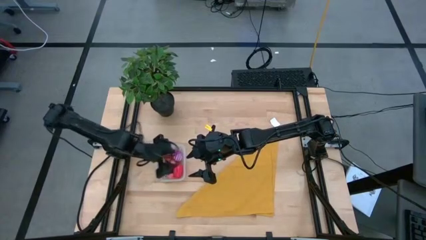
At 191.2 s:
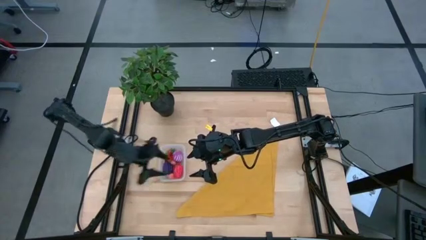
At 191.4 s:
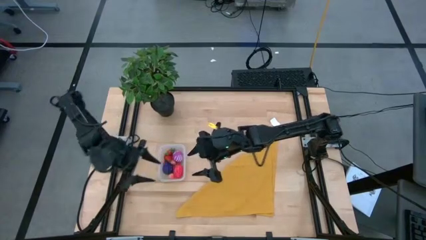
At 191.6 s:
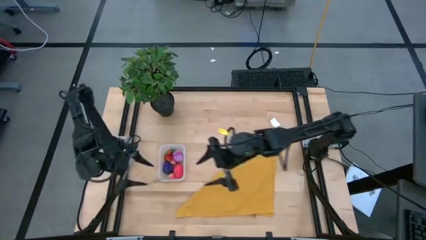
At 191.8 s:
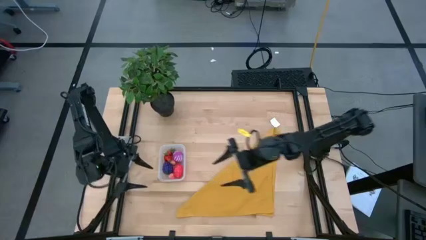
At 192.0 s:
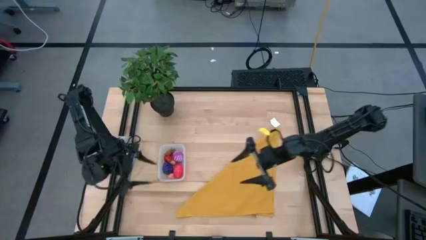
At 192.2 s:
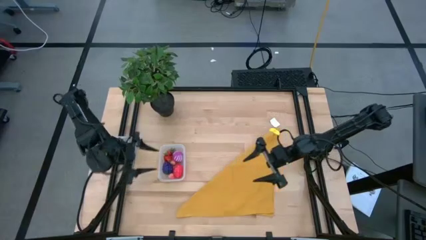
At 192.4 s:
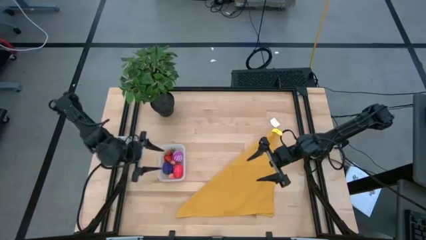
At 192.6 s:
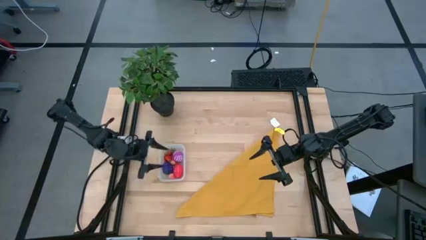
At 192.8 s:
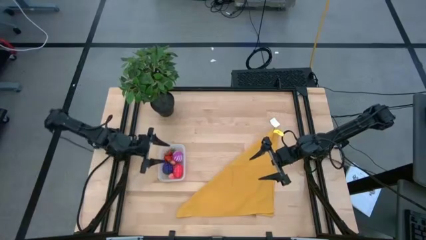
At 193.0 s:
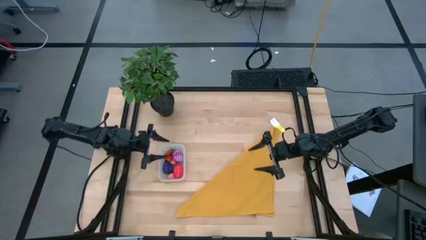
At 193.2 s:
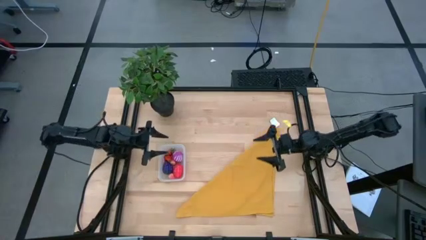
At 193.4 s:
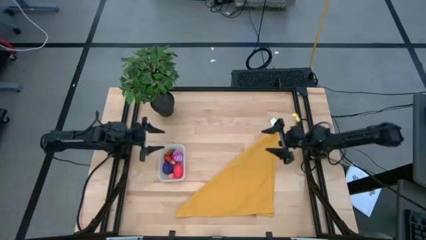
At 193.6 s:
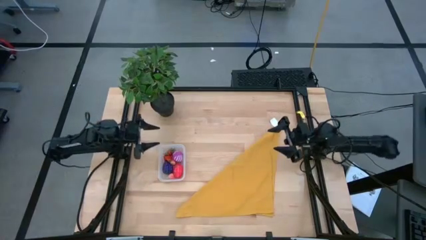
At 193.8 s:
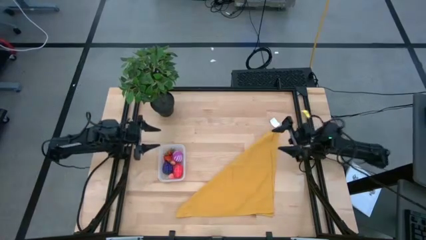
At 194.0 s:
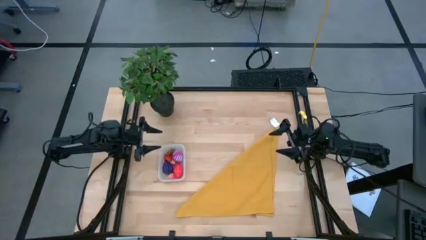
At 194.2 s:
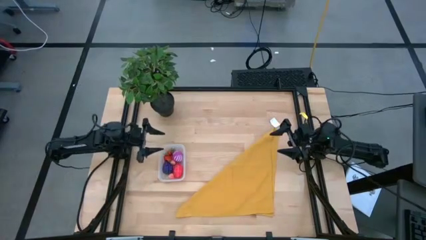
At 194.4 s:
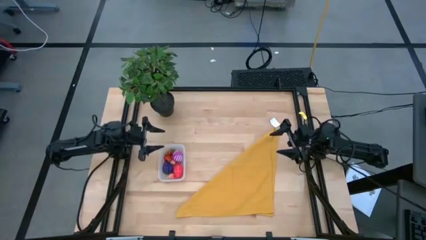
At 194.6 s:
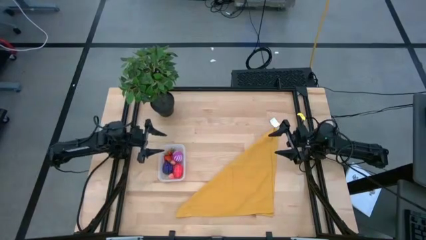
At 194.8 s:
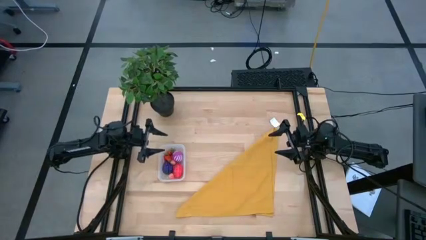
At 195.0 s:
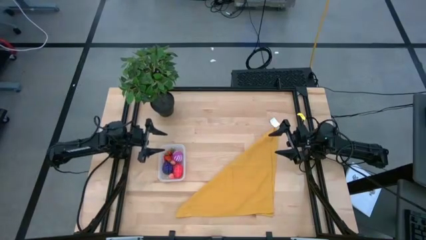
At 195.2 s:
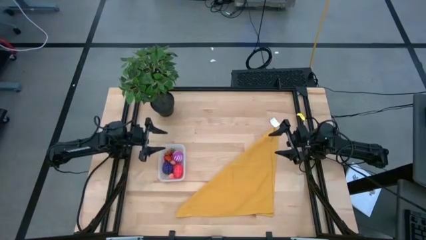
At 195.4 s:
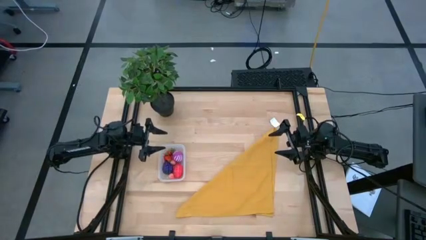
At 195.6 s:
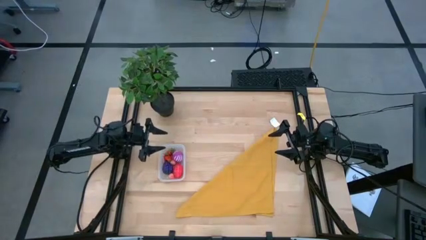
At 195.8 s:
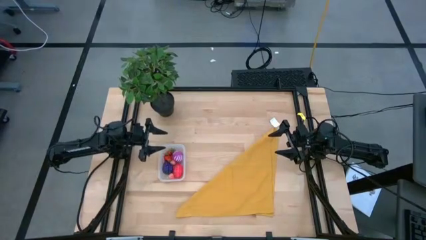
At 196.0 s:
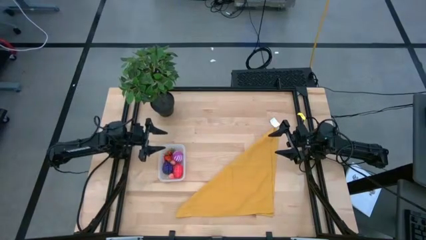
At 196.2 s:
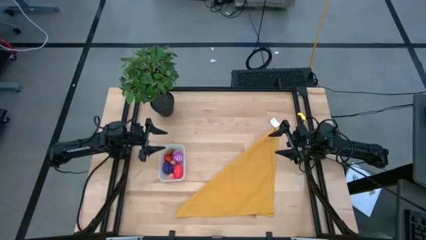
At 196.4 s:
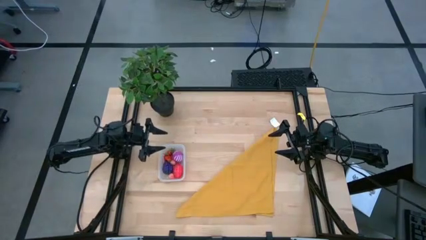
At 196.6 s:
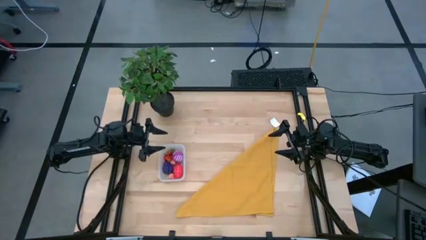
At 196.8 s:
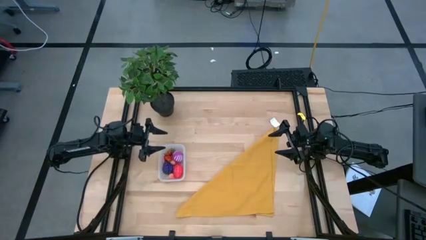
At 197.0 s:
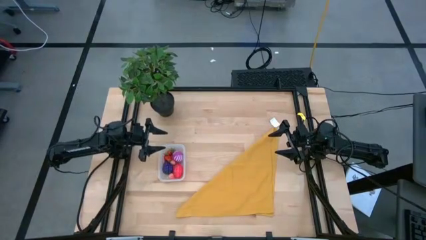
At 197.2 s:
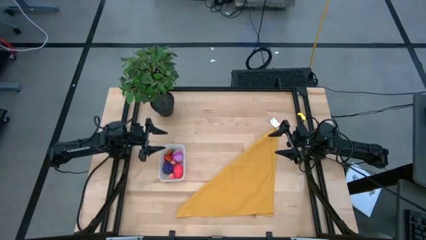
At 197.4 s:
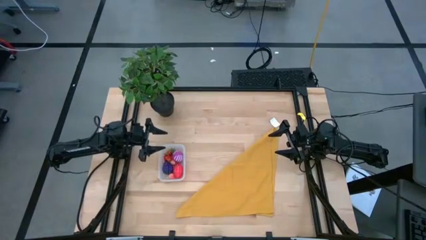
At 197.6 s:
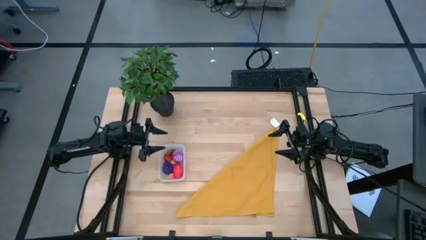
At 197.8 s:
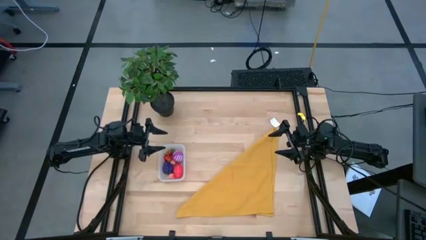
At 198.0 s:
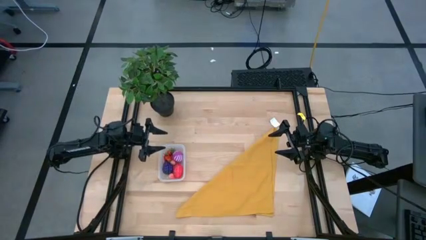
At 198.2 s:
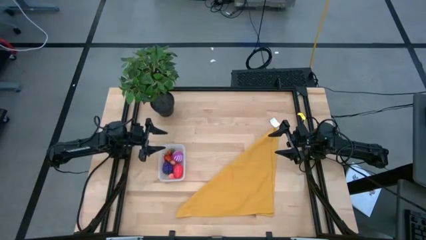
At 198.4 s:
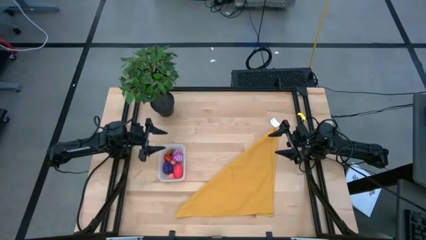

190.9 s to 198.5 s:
Task: Pick and placing Produce into tupperware
Return to Home Position

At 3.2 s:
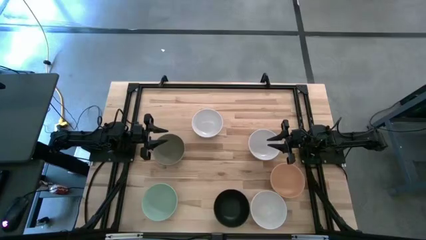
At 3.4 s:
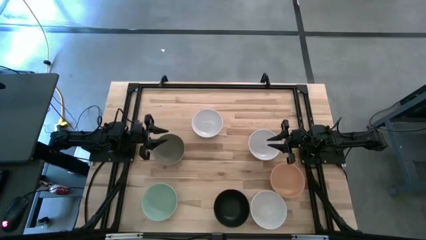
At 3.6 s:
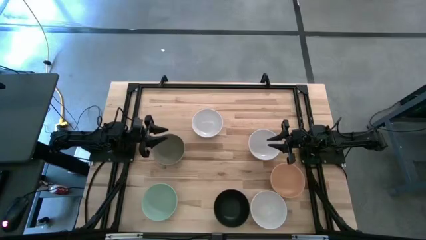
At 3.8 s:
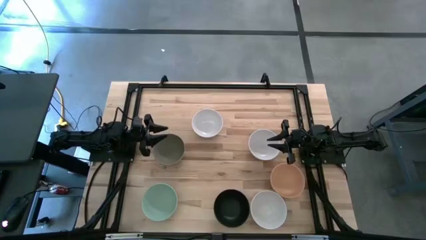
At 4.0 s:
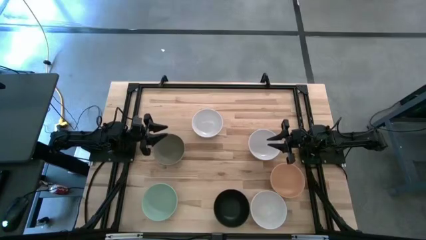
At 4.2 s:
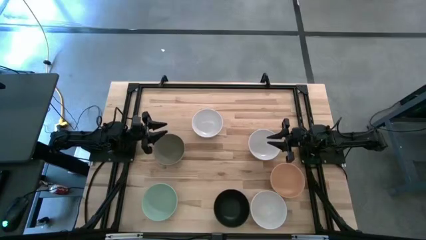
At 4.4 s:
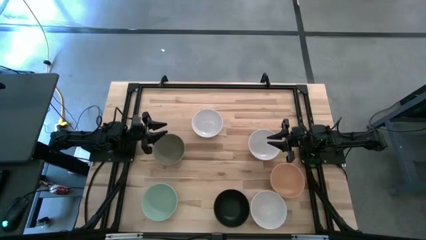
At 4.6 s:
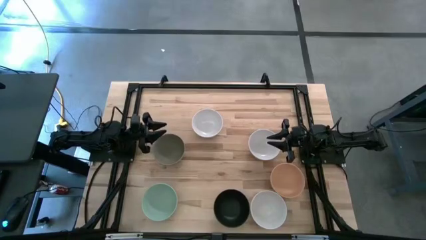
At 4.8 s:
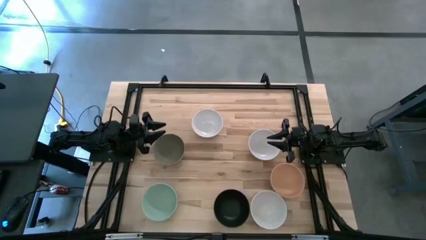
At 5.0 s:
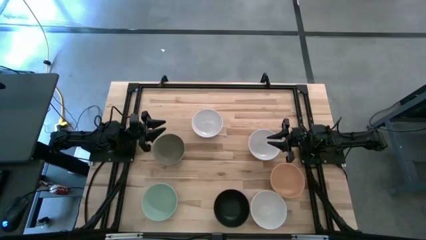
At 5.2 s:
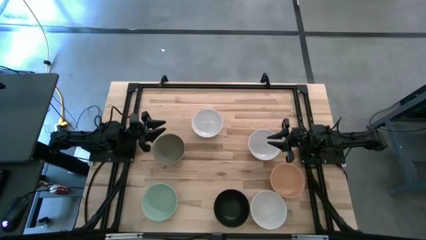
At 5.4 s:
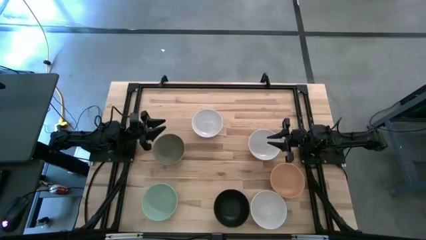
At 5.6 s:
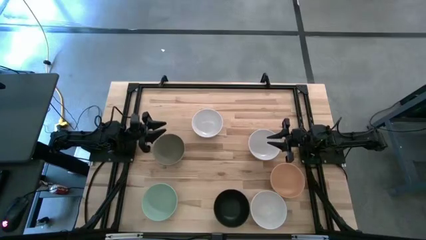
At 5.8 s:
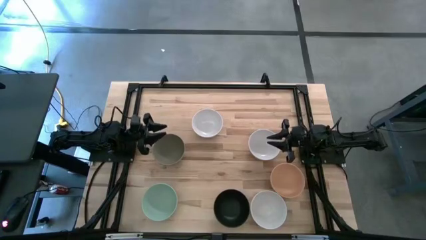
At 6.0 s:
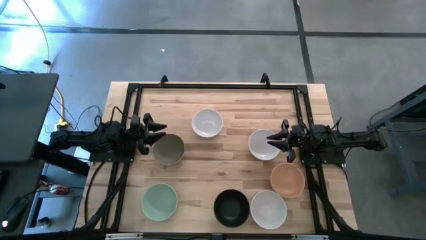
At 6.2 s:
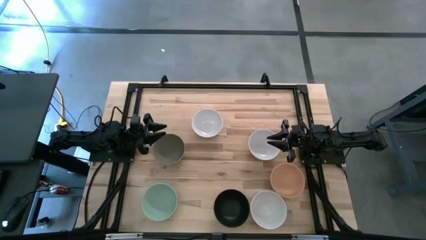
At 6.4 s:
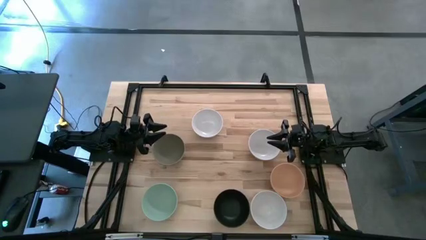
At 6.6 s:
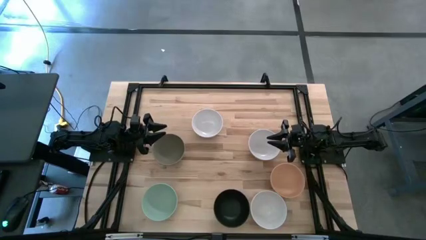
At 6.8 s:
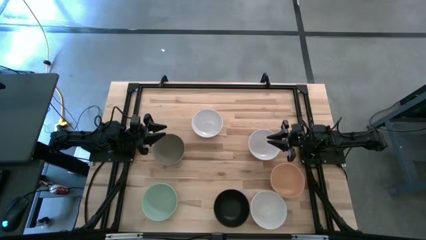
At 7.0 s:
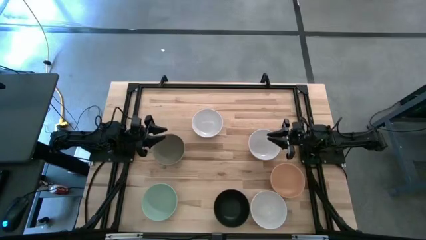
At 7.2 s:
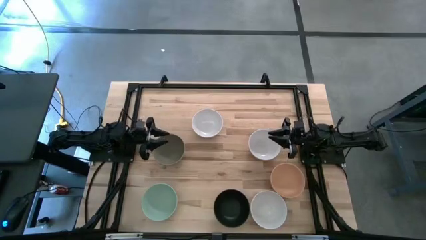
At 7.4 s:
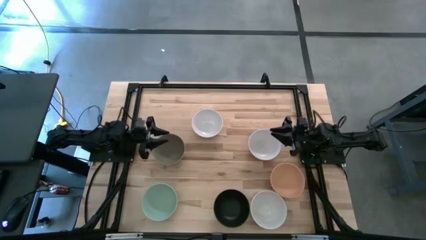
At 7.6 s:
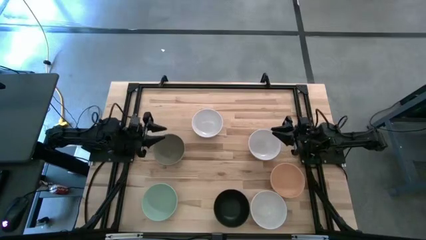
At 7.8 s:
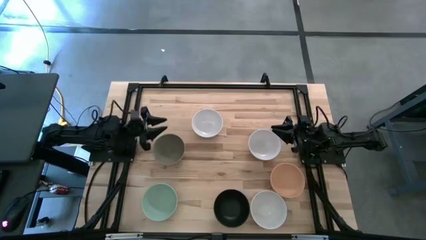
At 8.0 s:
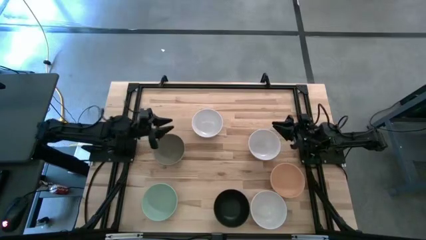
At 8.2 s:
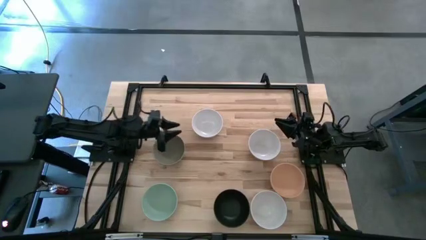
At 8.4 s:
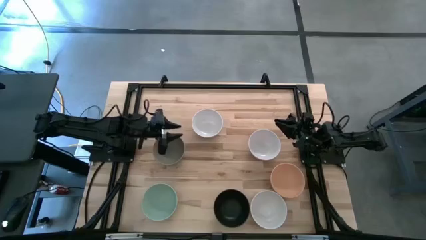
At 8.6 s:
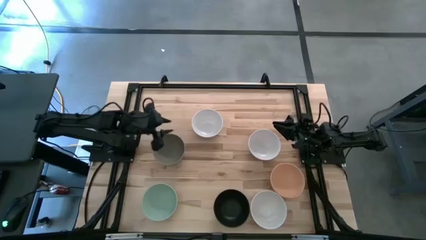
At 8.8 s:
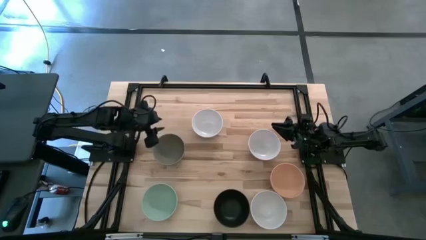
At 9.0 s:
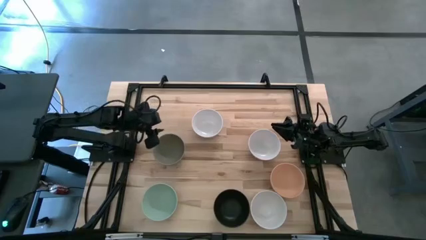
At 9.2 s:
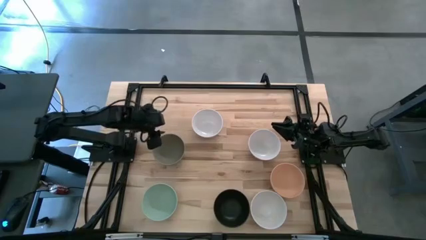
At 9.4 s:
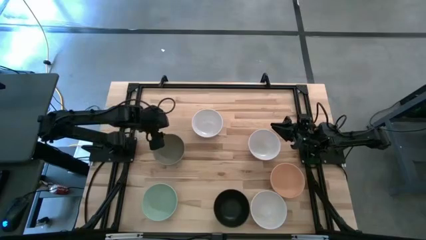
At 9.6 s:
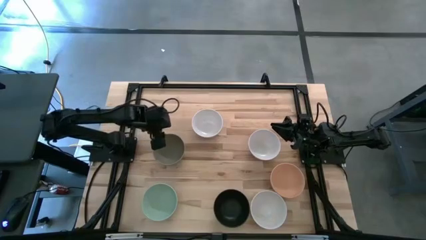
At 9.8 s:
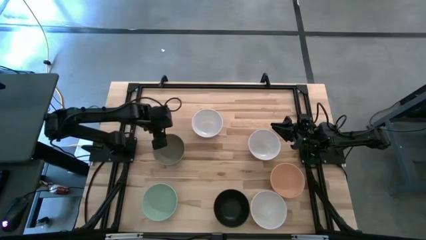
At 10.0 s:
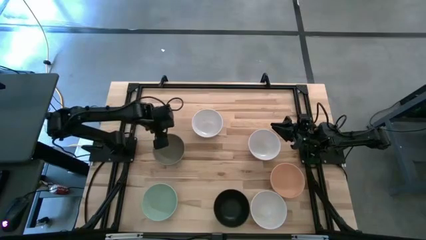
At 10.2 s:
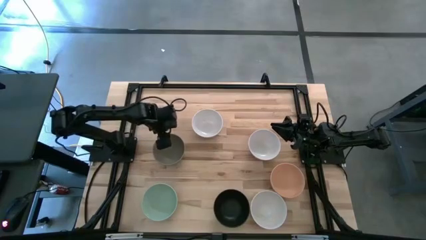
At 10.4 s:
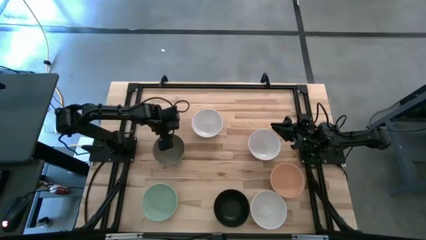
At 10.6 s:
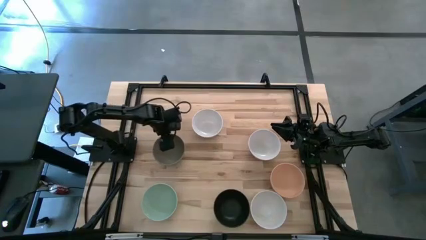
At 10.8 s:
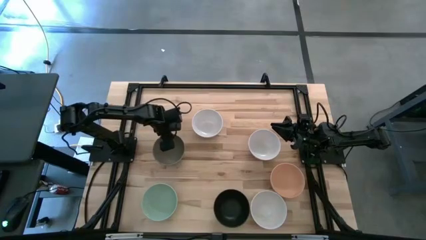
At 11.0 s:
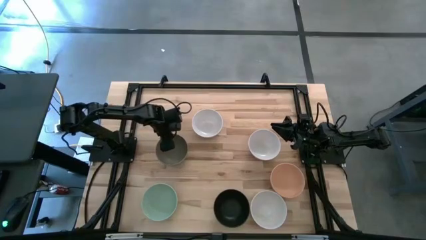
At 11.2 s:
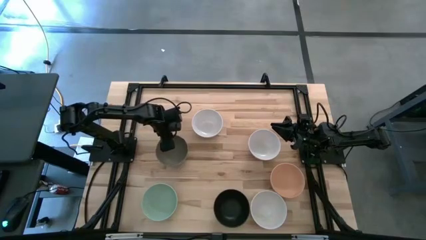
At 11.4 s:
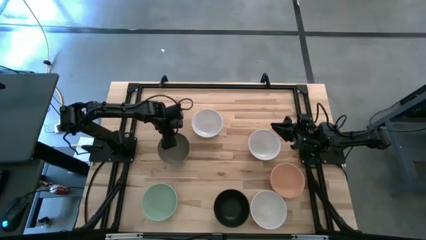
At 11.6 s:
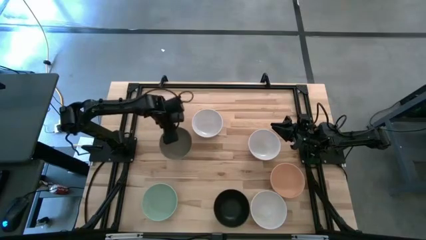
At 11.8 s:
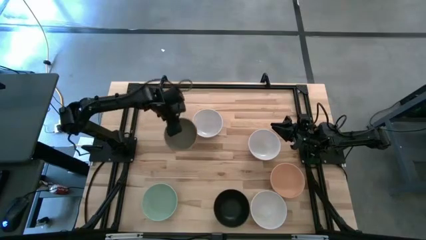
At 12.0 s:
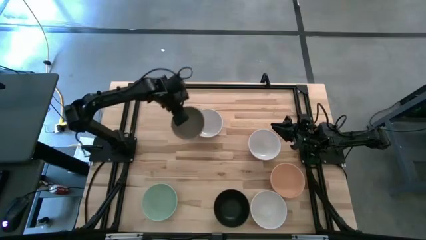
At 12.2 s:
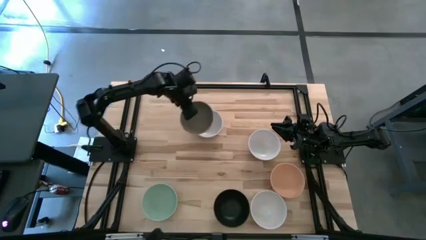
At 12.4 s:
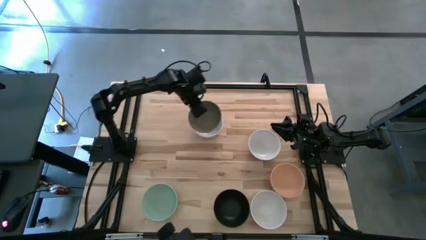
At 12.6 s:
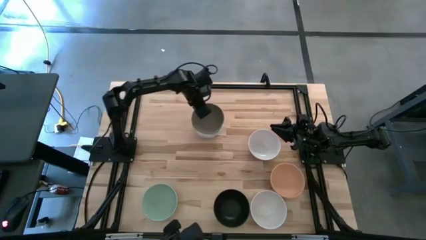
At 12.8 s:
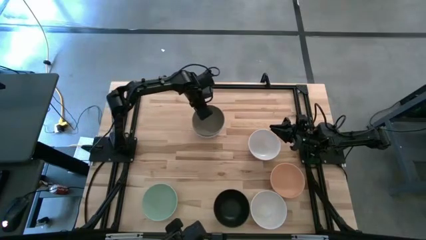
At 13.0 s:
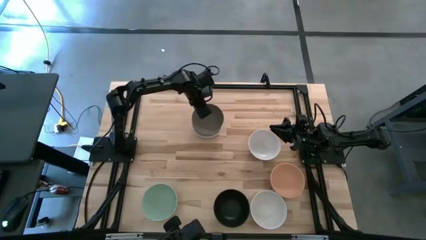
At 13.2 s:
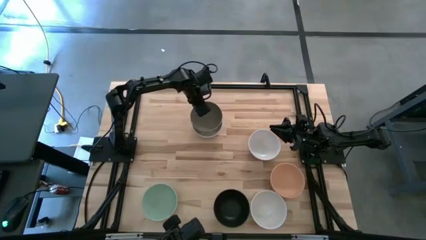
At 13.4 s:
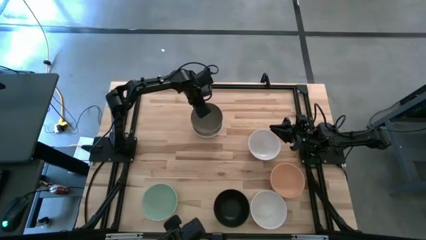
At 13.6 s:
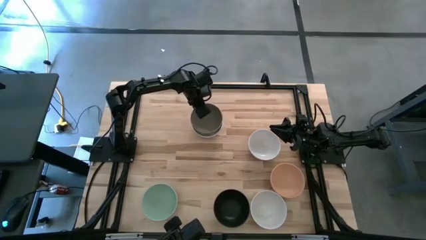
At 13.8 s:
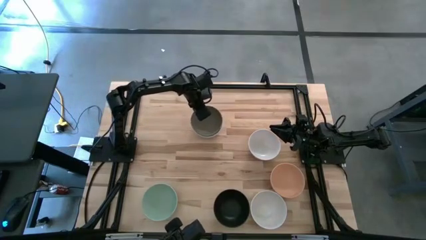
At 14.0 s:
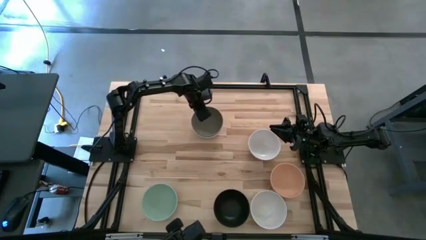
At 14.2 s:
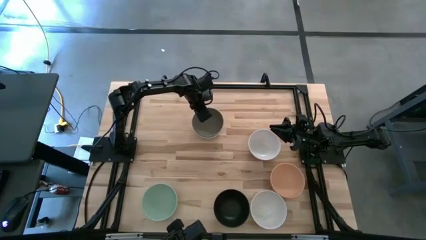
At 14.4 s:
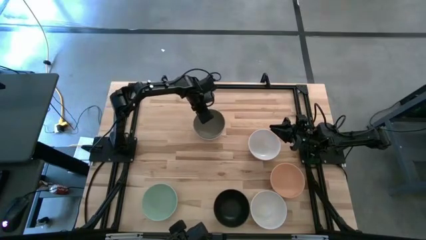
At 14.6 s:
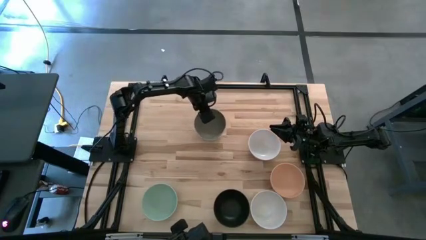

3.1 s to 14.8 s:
Task: Nest bowls inside each other
Stack the gray bowl on the white bowl
